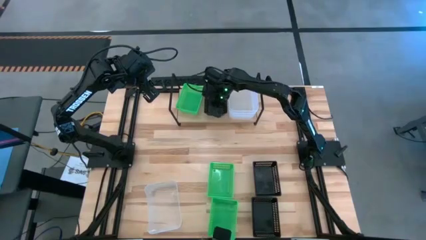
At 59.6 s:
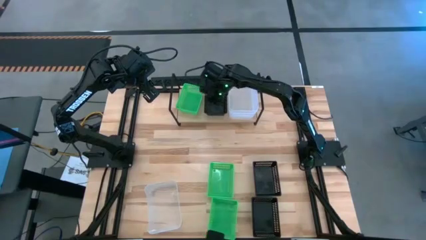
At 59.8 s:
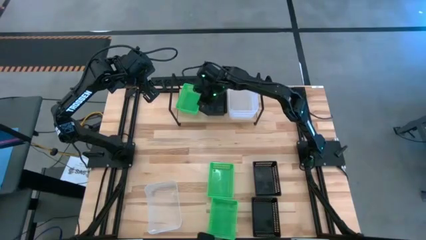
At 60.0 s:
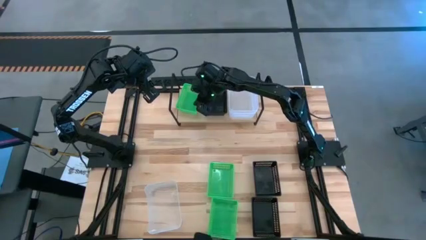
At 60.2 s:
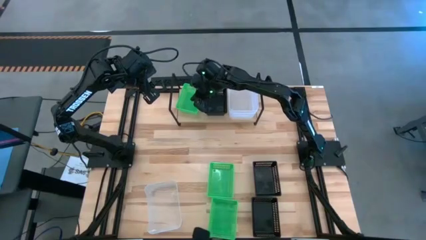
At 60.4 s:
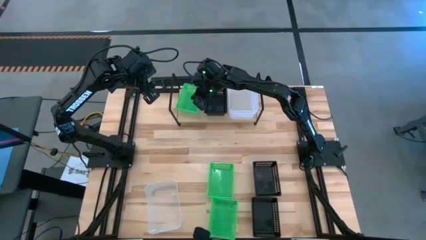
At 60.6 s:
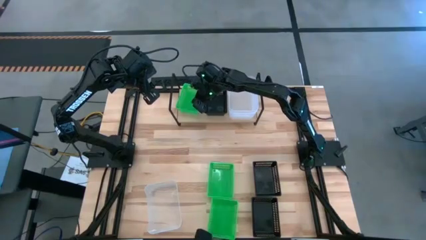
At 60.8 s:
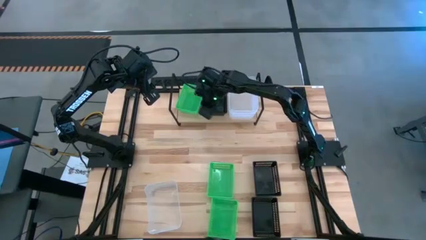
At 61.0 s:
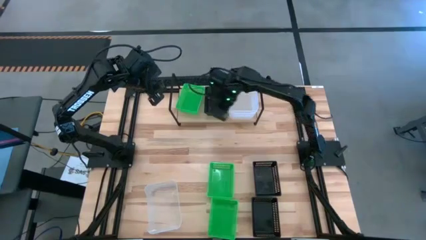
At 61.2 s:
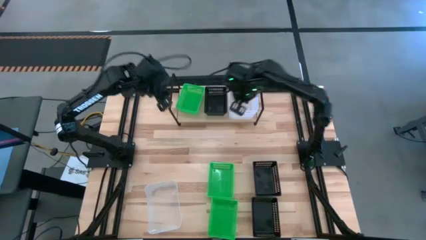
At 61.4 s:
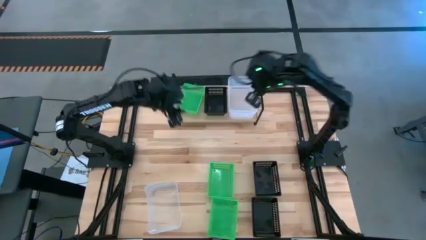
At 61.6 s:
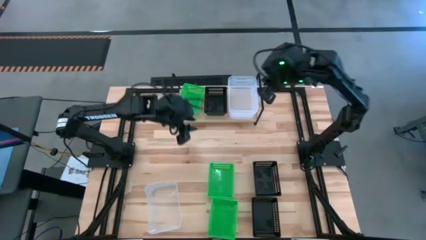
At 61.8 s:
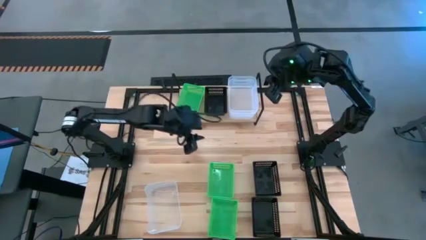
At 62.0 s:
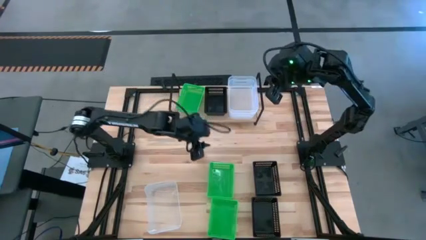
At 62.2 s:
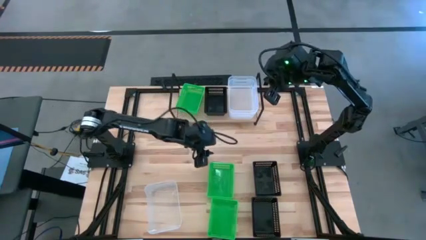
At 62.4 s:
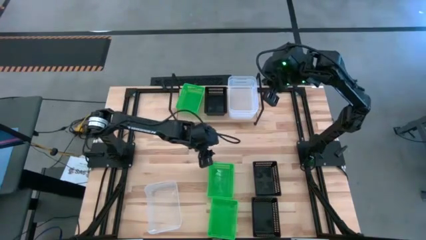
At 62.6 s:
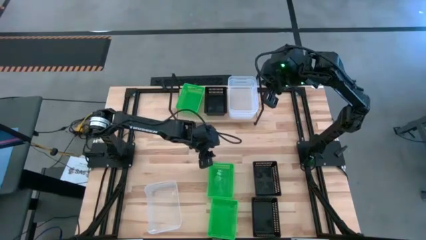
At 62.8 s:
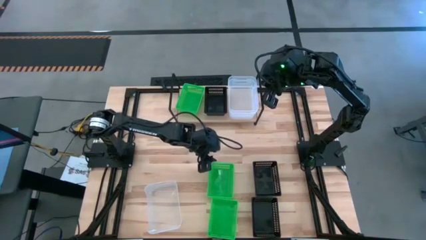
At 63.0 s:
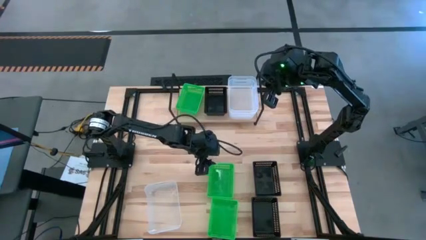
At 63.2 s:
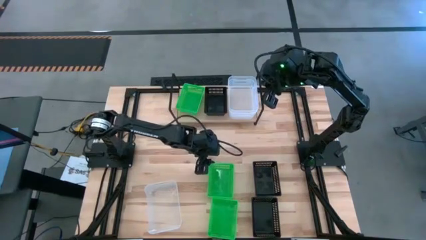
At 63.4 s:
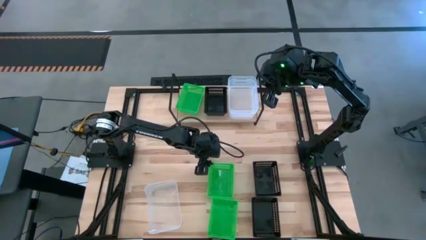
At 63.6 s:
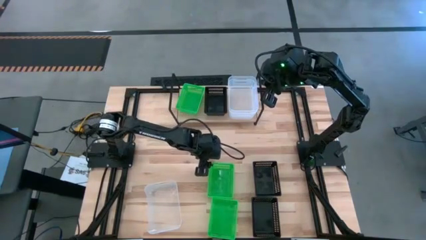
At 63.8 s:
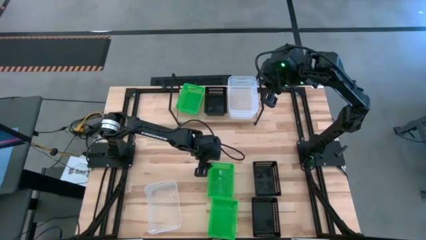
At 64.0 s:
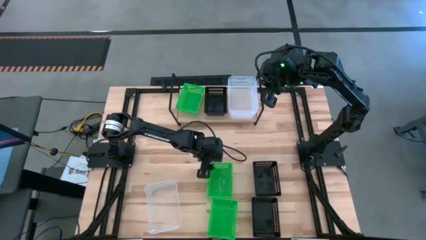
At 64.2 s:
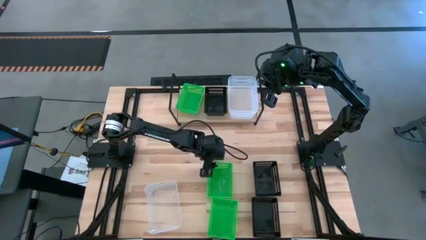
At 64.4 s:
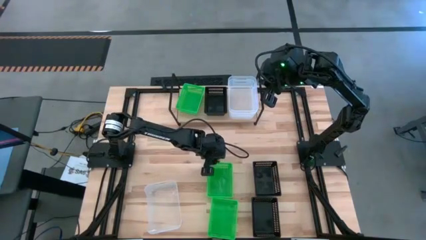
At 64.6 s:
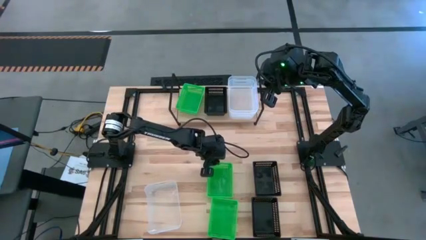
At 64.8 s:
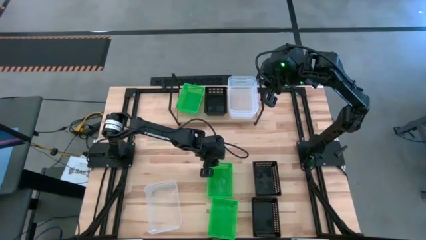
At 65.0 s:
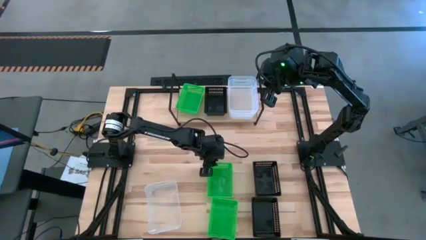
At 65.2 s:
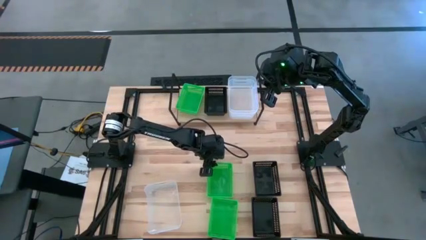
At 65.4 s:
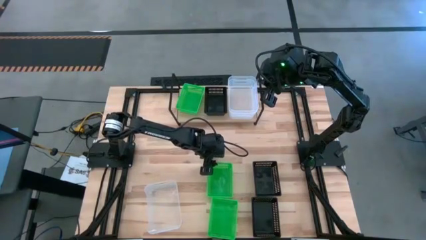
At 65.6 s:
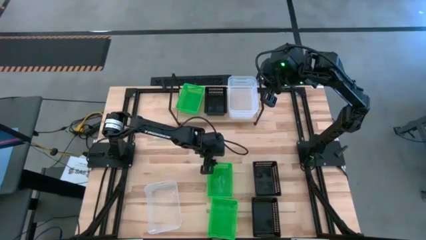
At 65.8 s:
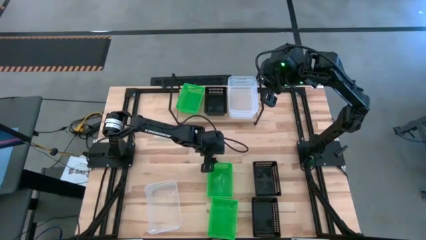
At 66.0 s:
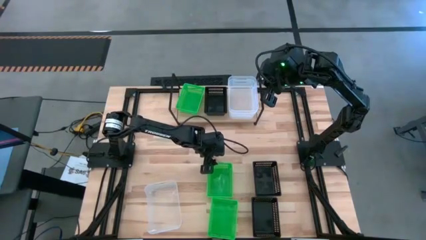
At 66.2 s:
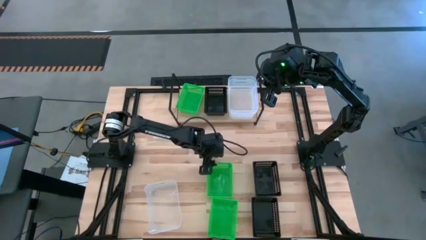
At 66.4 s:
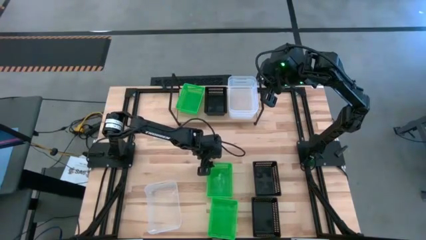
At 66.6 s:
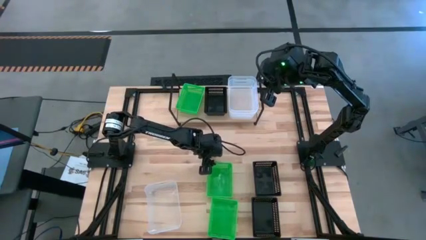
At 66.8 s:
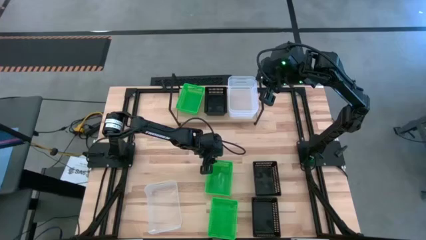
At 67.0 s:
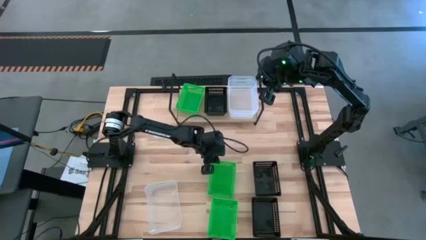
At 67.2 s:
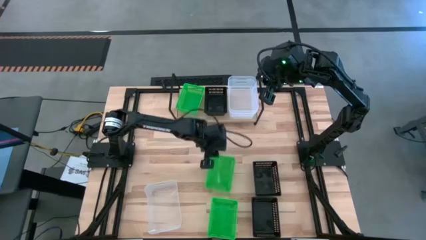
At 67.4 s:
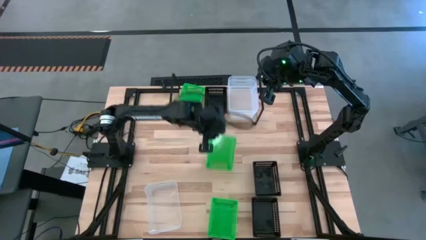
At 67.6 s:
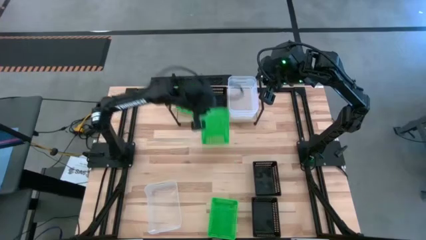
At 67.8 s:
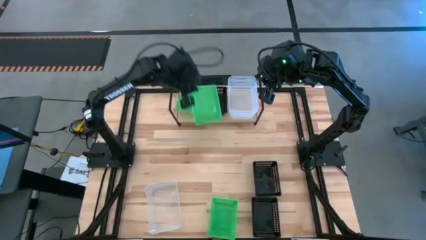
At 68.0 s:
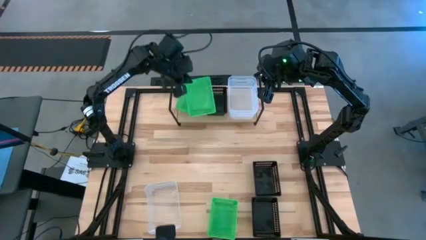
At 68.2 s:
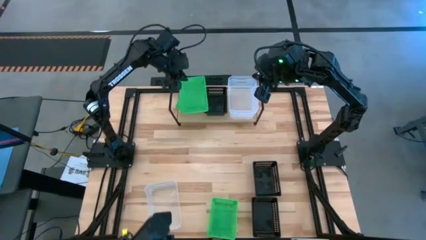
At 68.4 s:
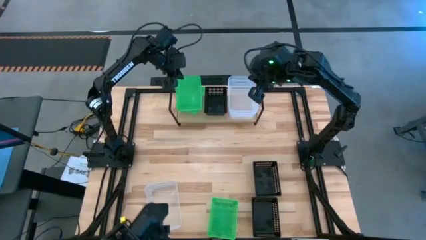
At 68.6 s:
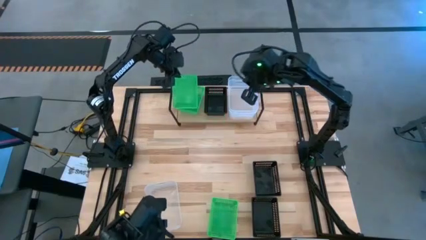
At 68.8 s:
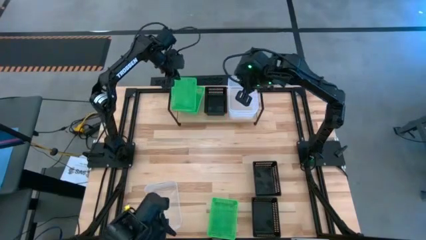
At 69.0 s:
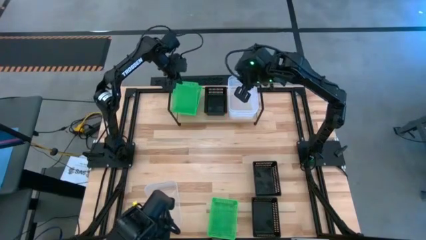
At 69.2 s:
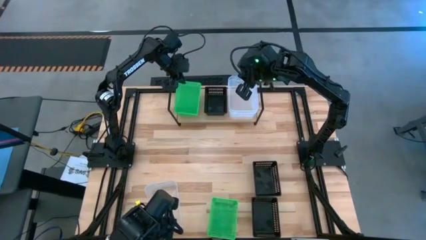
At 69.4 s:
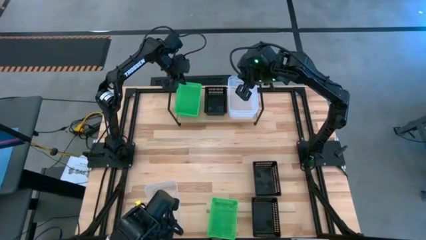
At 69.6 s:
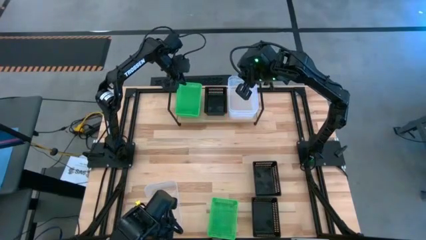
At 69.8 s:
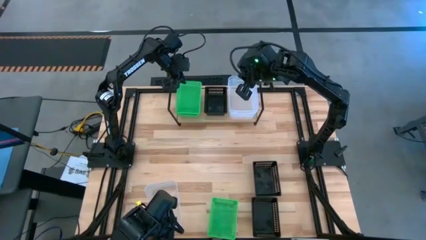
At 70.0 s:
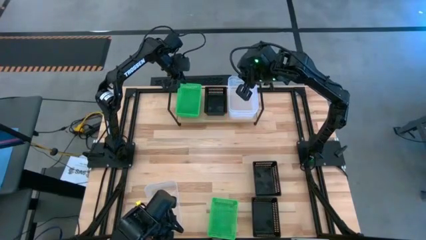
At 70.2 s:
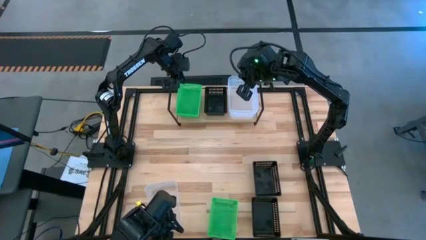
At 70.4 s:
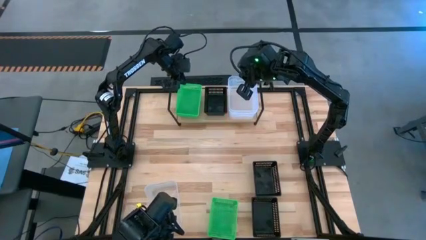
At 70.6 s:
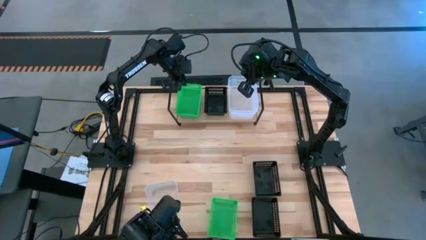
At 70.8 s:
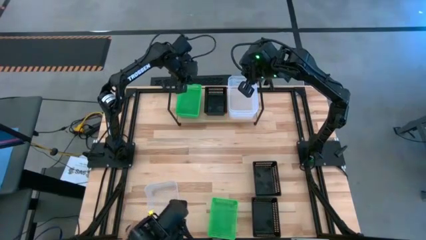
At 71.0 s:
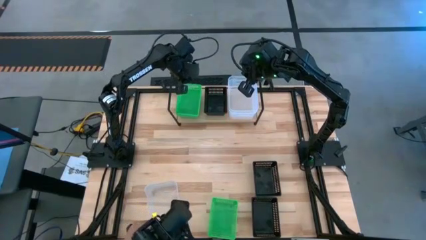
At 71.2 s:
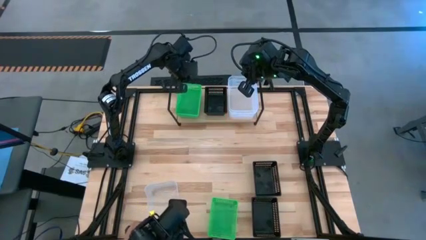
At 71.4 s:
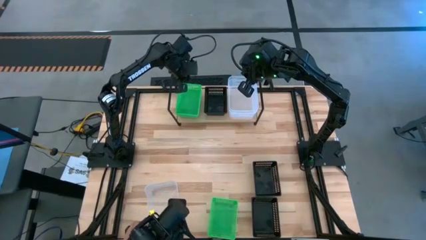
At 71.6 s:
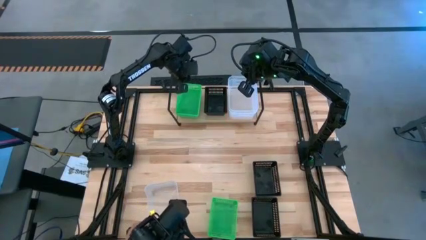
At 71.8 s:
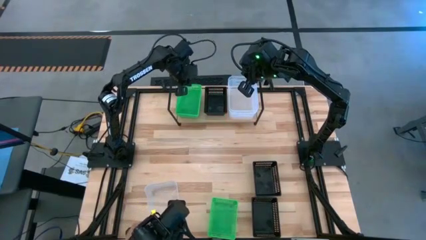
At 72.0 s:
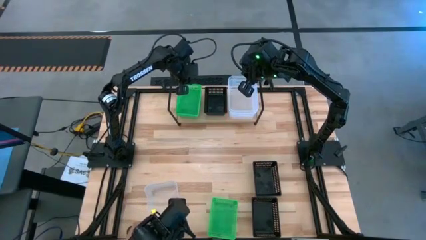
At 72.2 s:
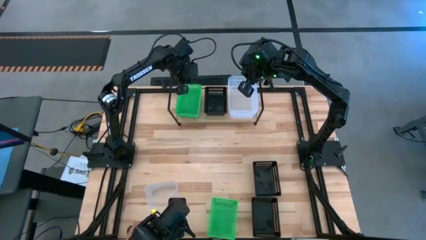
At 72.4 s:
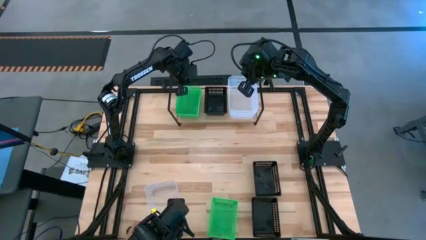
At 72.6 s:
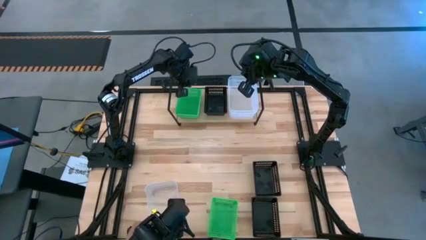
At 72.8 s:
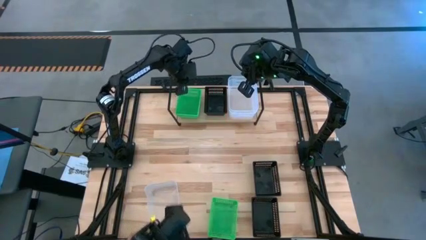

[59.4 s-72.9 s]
Task: Stack baskets on shelf by color
Stack the top green bin into the green bin on the shelf
